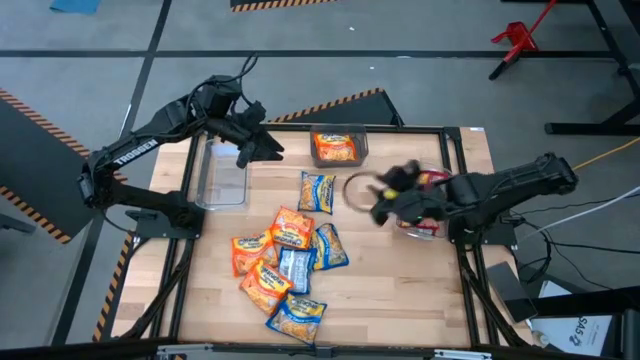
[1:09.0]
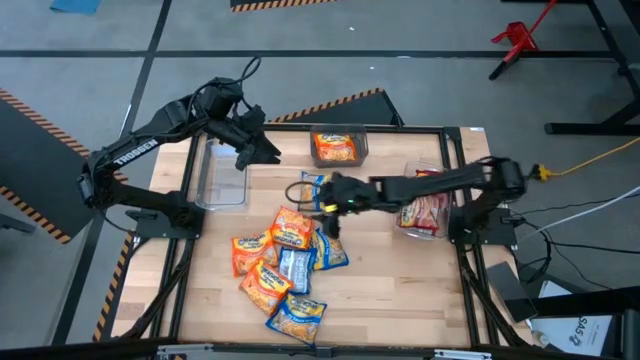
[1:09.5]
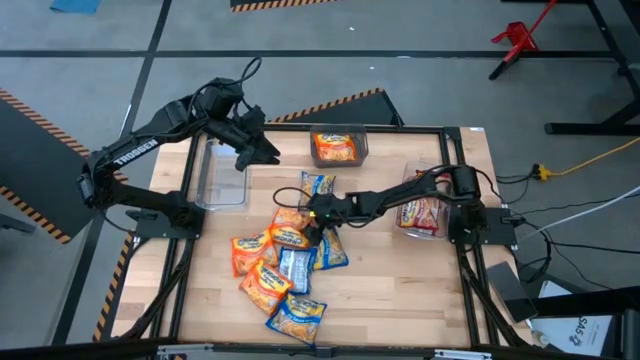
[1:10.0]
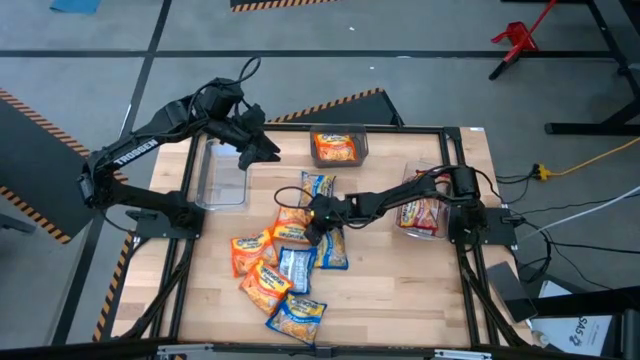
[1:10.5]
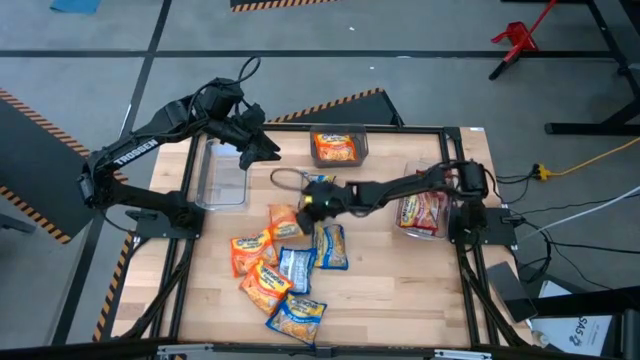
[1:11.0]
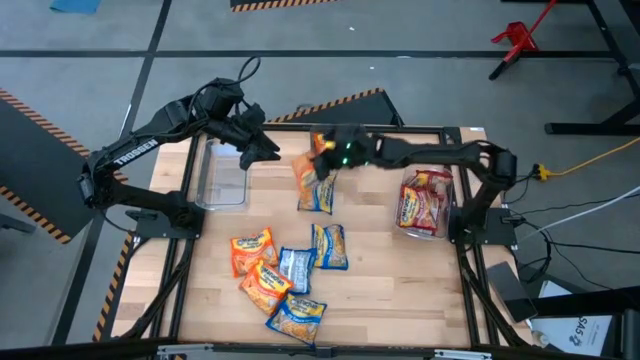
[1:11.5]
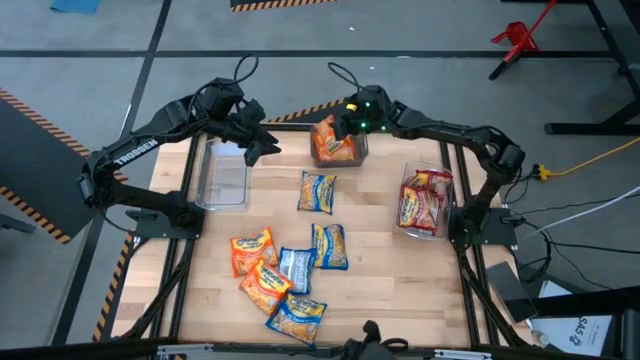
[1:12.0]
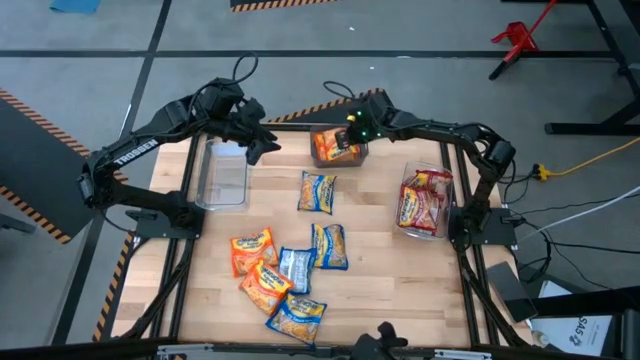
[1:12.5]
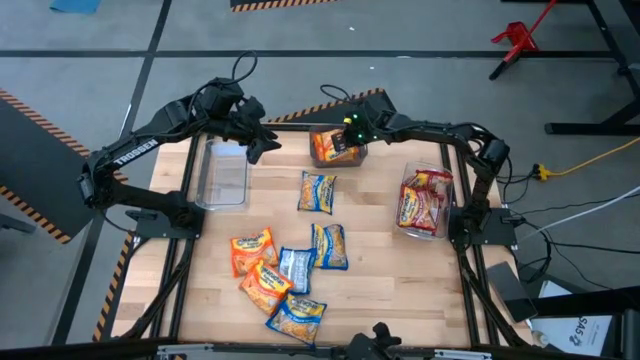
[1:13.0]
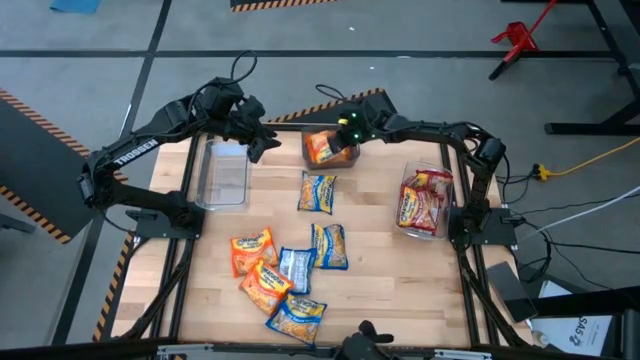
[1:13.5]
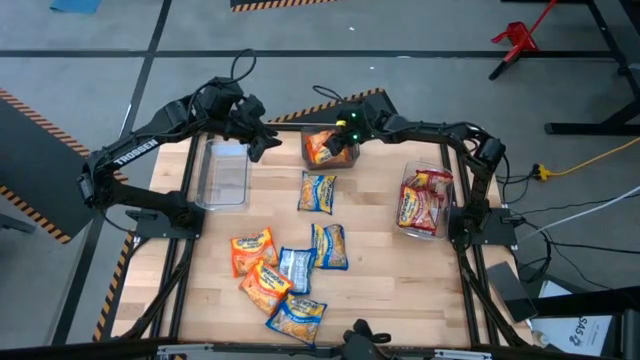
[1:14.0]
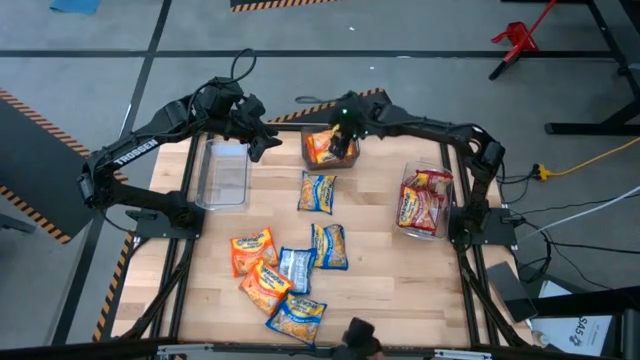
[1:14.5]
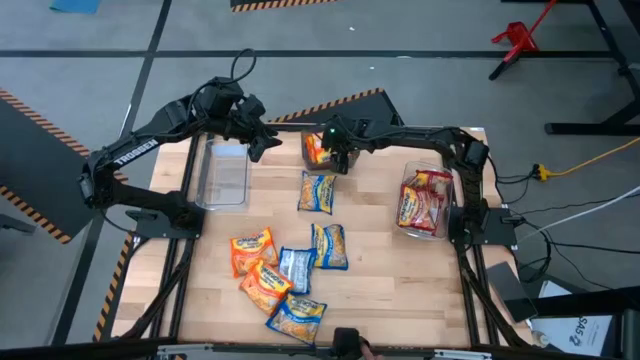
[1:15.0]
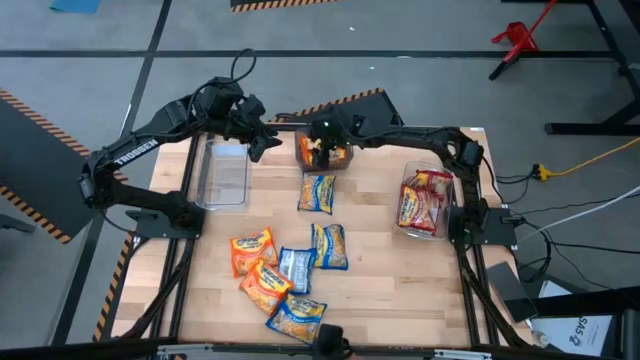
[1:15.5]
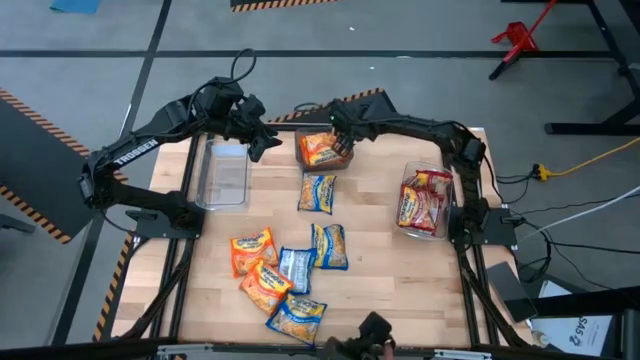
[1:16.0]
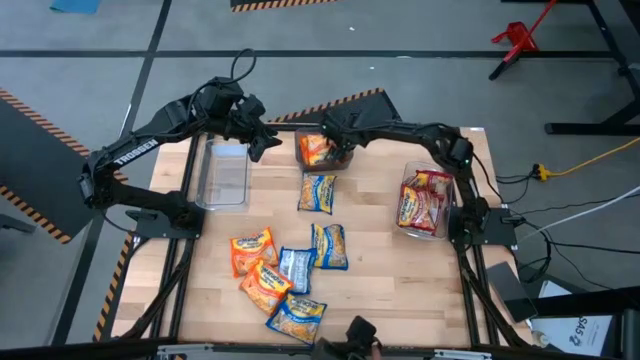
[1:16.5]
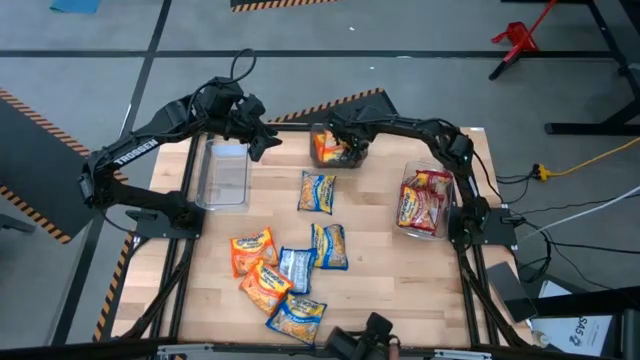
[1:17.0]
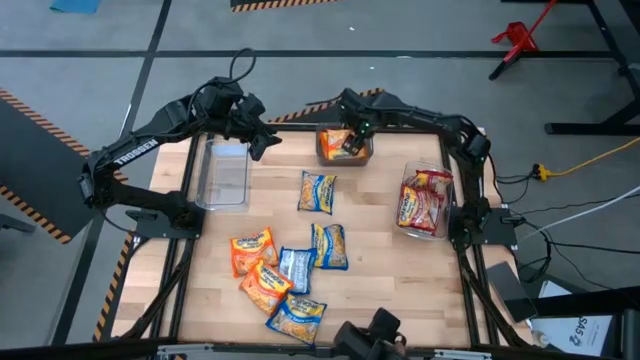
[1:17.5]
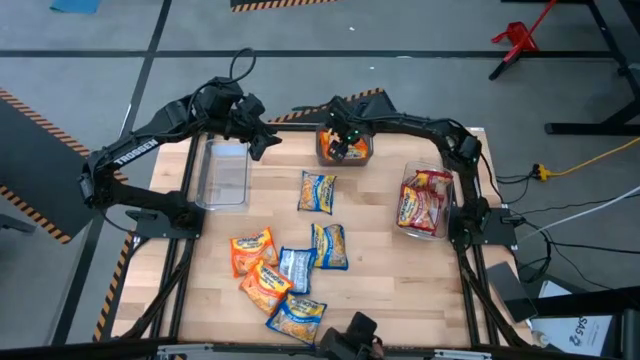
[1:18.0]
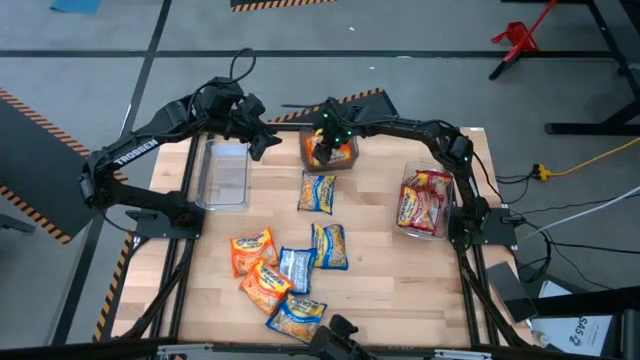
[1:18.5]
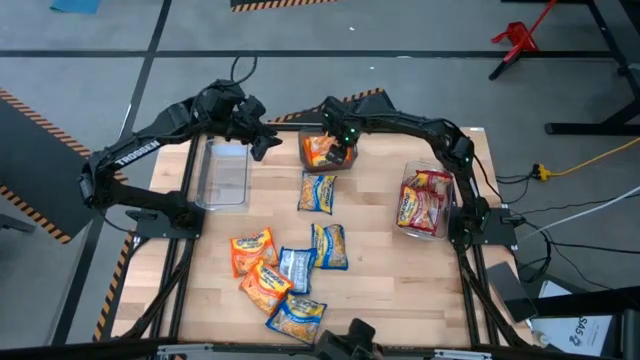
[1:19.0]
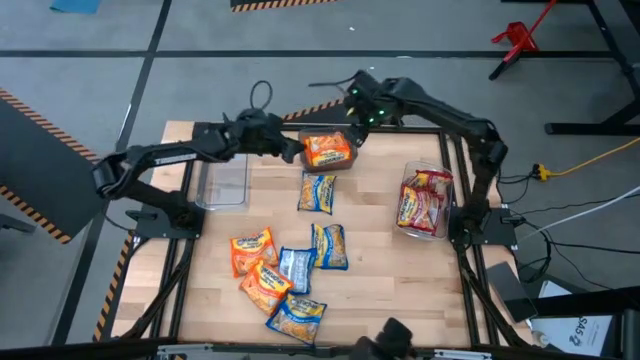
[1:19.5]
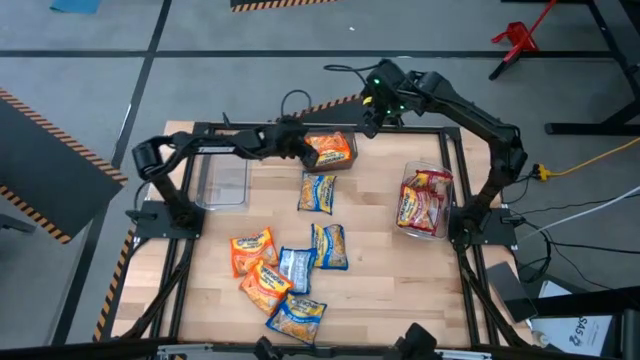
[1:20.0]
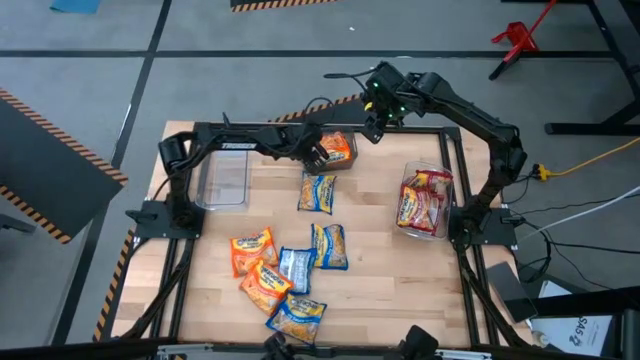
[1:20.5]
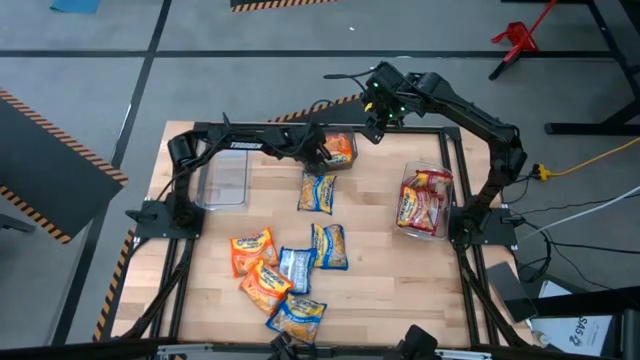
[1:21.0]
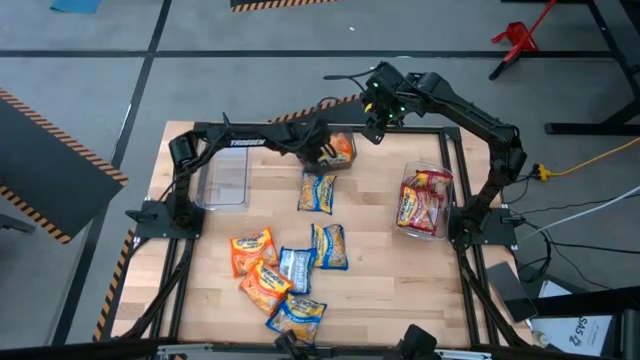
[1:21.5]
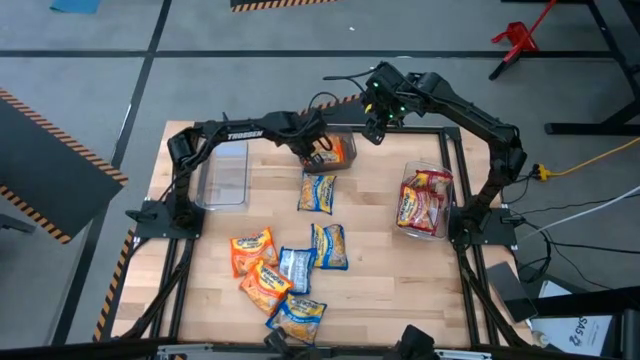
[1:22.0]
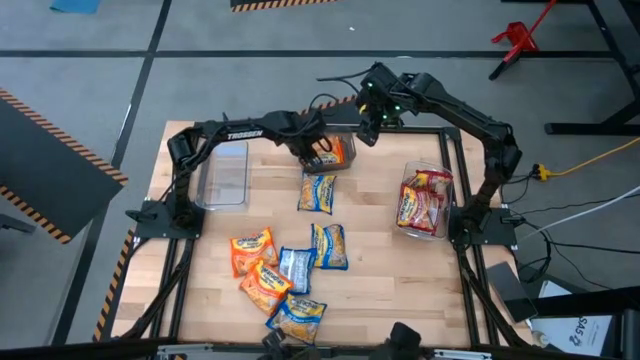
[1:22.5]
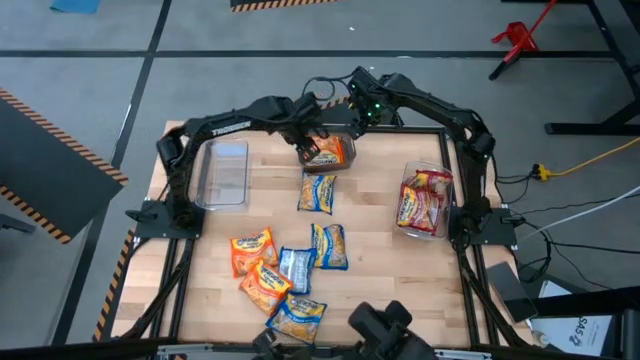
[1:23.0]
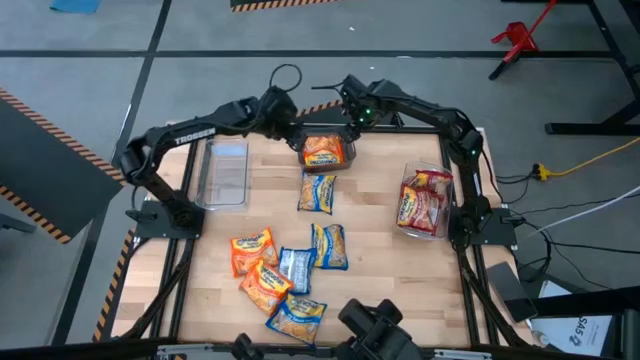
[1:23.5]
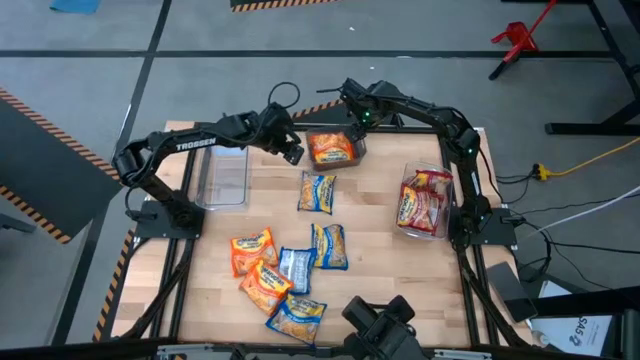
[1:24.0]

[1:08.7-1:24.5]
Task: Sort Maruchan noodles
Put the orange noodle pack into the black bin

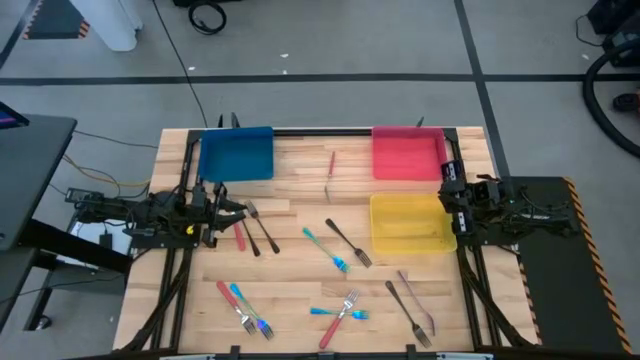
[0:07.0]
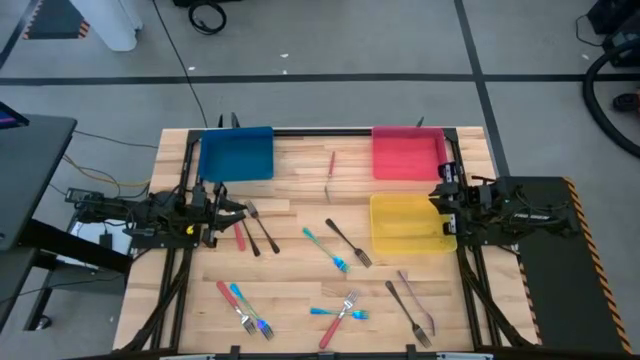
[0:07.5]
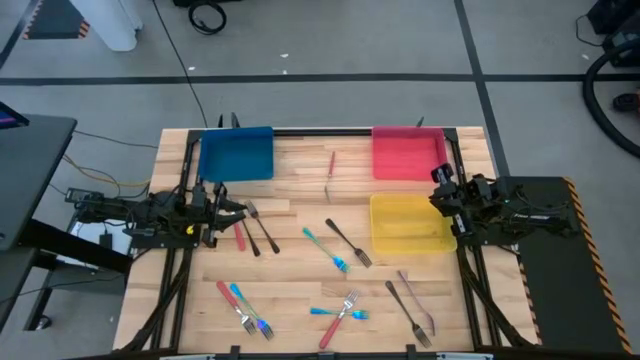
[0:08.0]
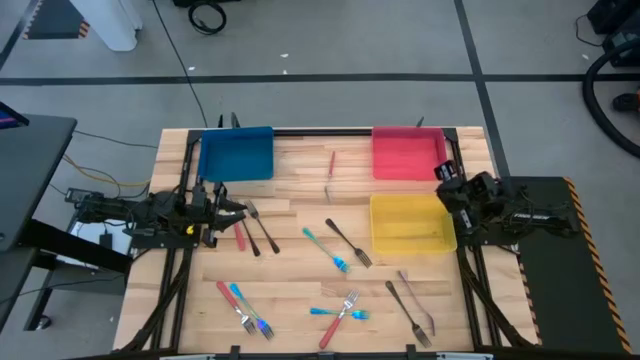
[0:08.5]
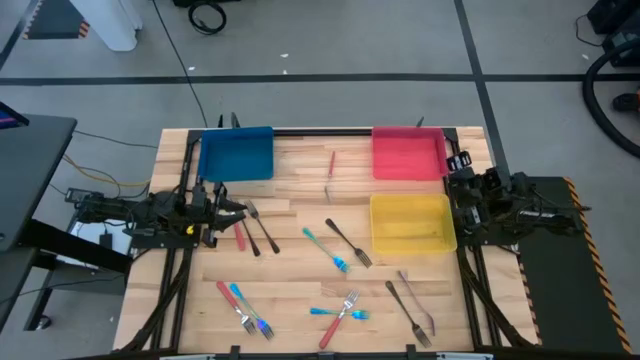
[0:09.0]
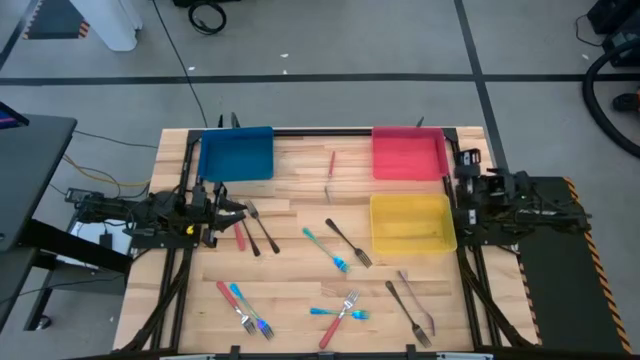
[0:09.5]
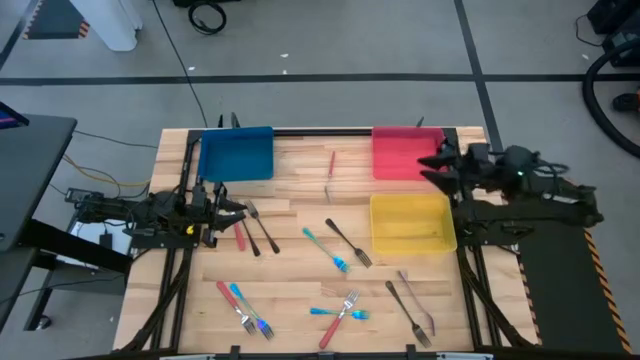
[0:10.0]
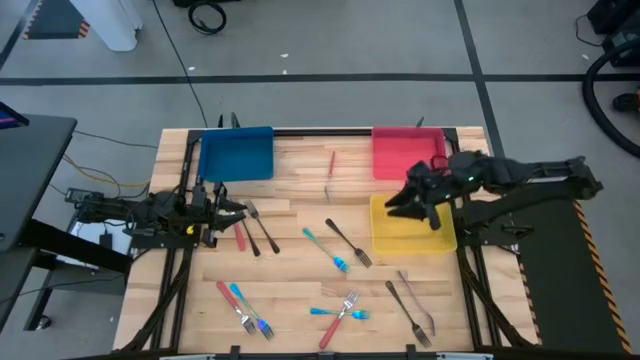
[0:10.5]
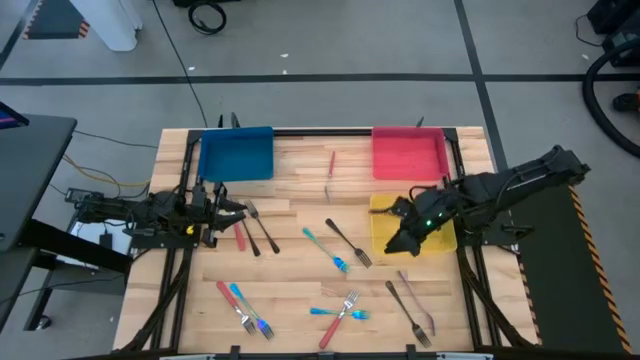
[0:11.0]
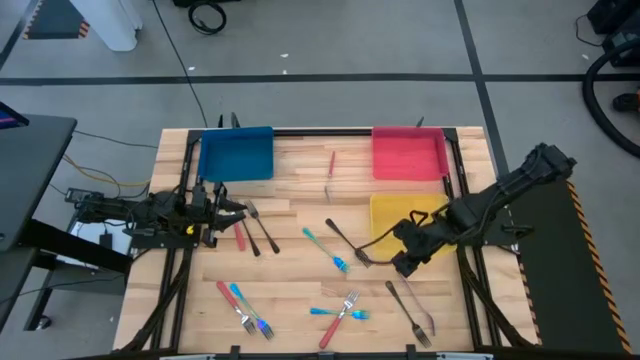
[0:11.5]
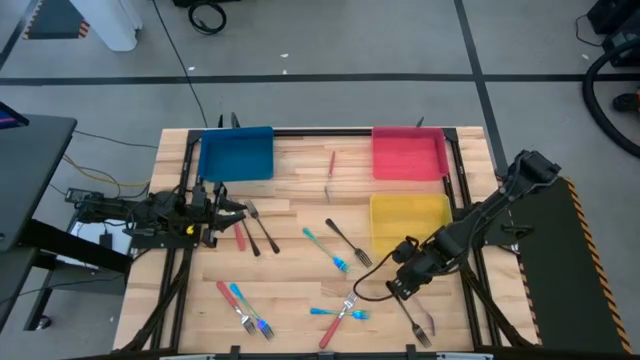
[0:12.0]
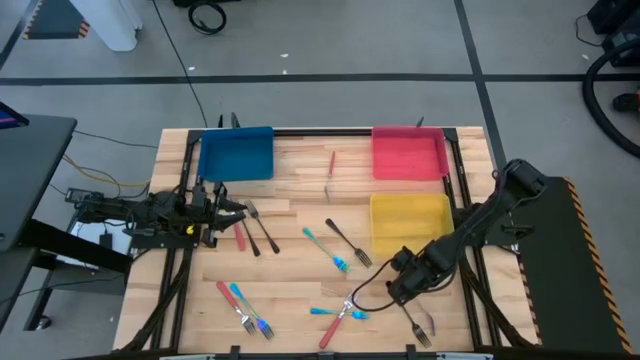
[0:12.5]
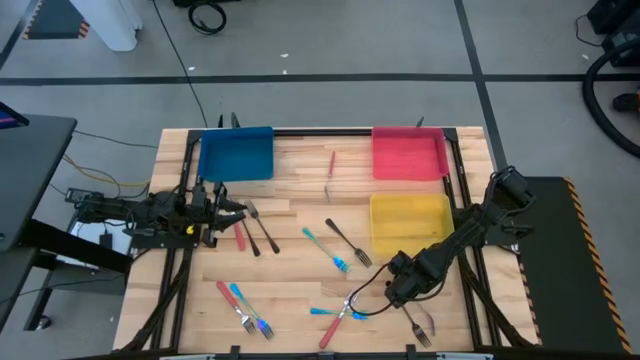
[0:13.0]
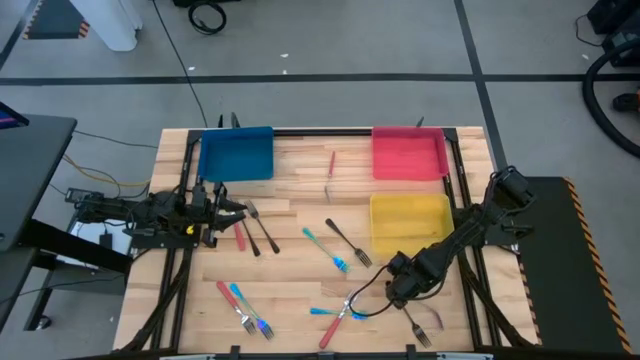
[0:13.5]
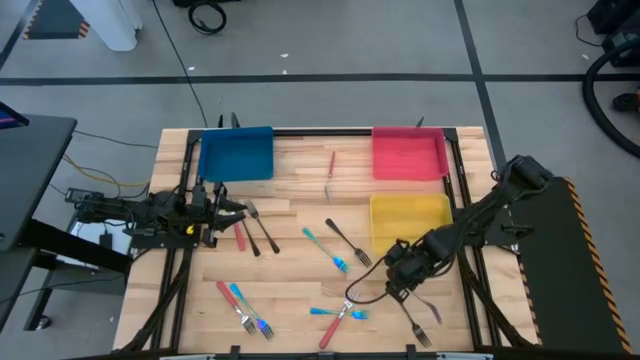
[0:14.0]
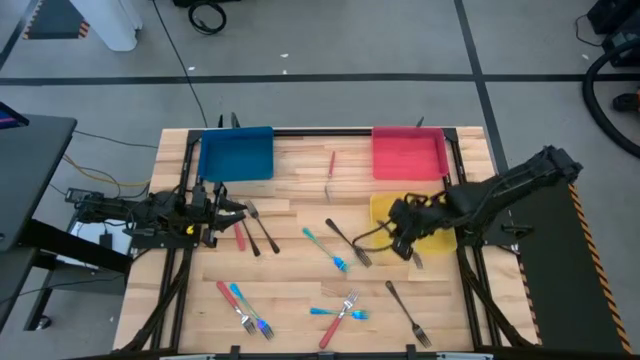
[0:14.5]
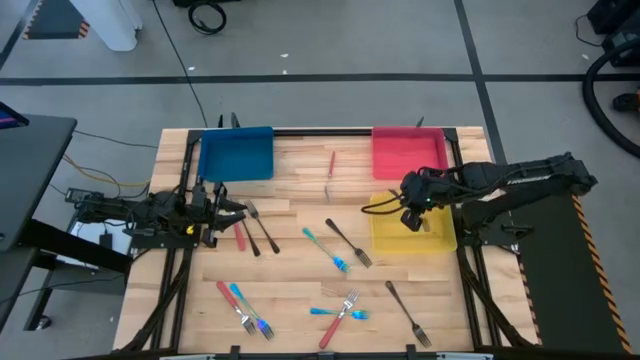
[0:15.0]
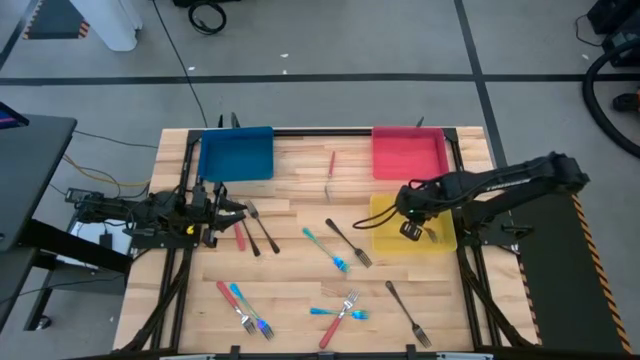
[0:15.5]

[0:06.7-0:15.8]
Task: Sort silverware by color (type)
Put the bottom right blue fork into the yellow bin
